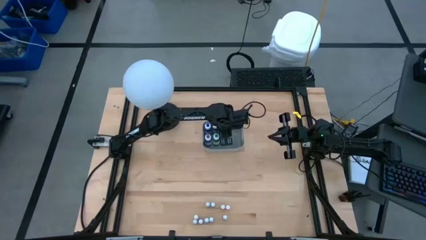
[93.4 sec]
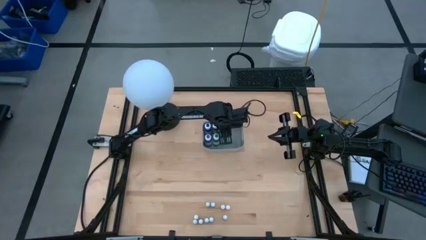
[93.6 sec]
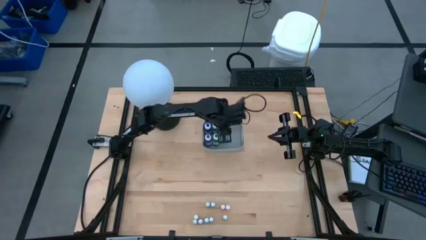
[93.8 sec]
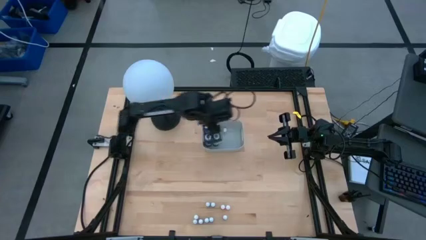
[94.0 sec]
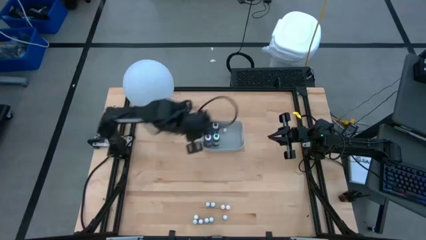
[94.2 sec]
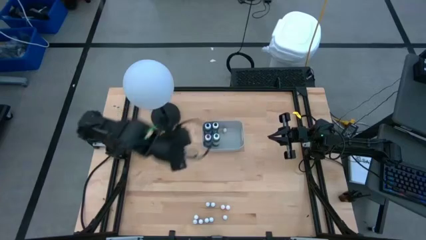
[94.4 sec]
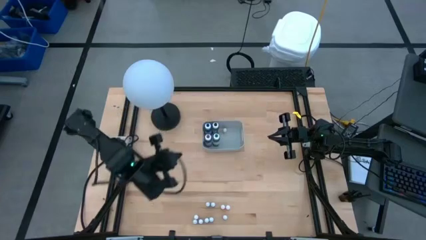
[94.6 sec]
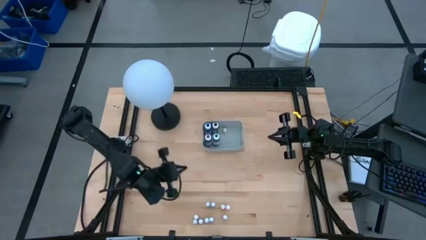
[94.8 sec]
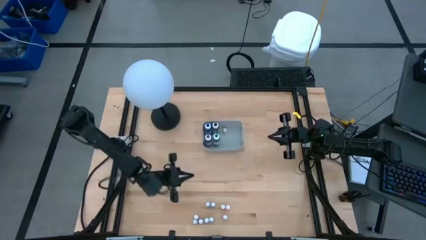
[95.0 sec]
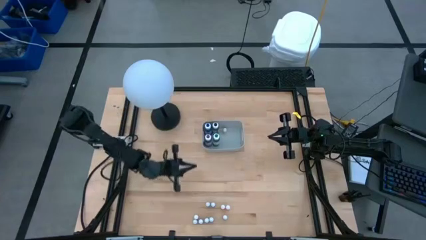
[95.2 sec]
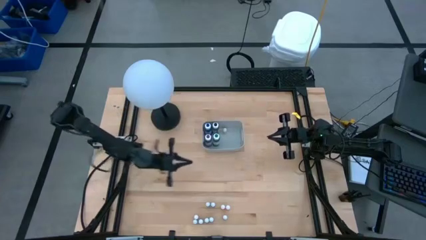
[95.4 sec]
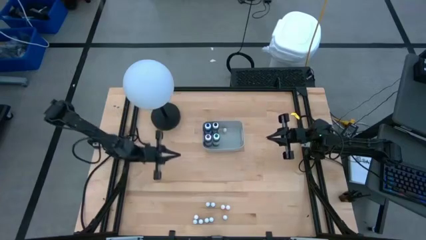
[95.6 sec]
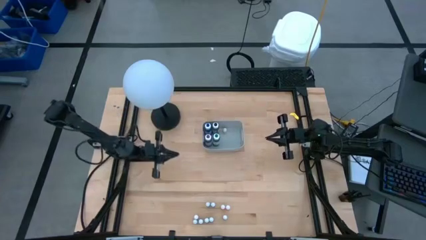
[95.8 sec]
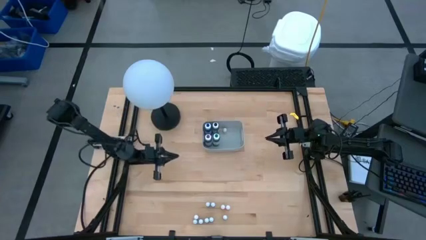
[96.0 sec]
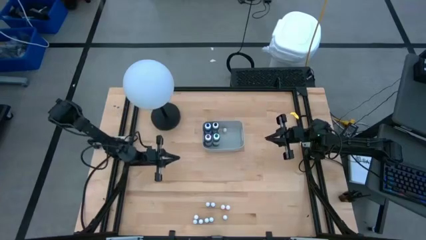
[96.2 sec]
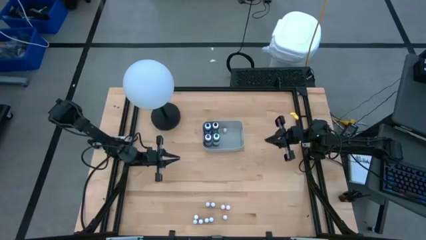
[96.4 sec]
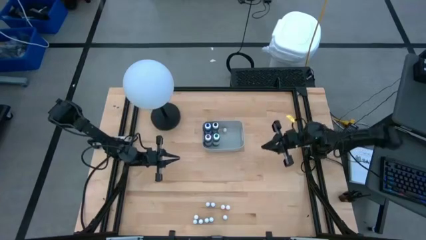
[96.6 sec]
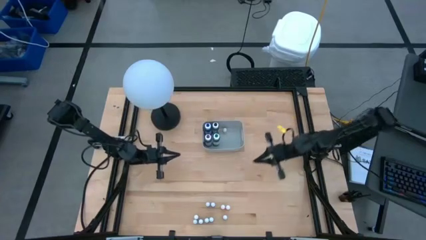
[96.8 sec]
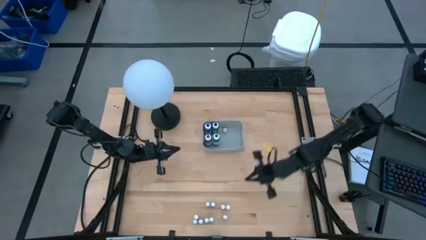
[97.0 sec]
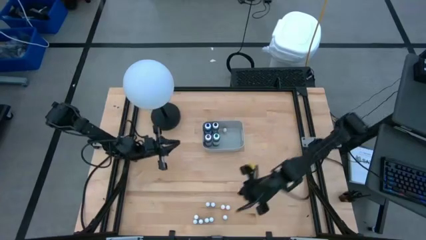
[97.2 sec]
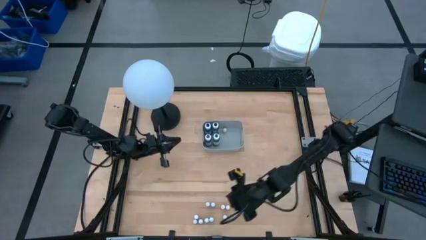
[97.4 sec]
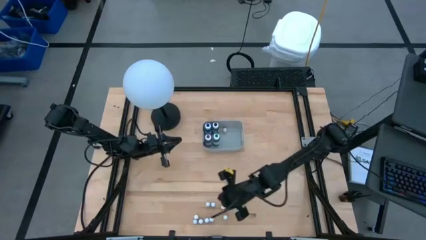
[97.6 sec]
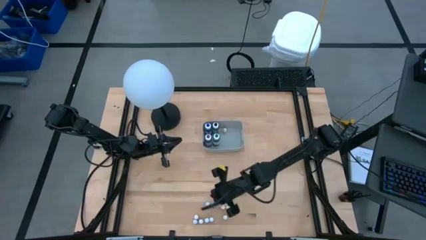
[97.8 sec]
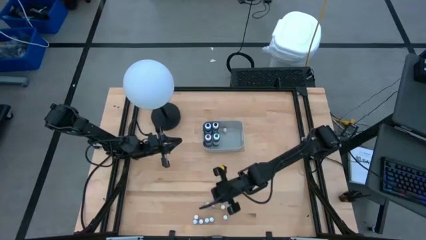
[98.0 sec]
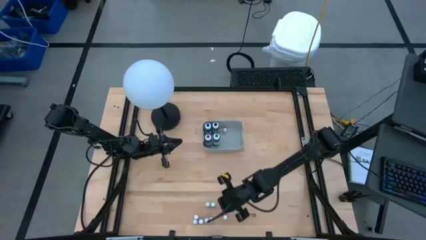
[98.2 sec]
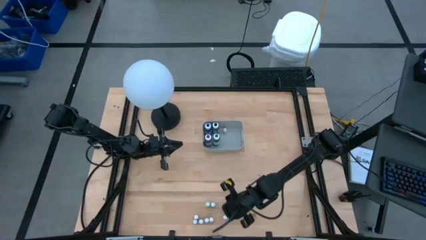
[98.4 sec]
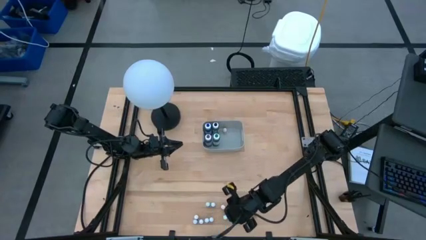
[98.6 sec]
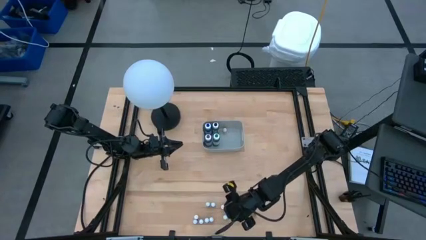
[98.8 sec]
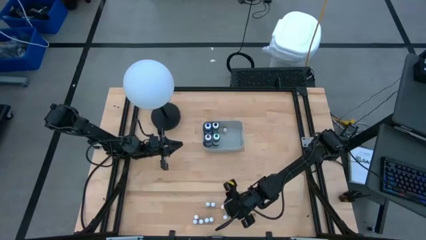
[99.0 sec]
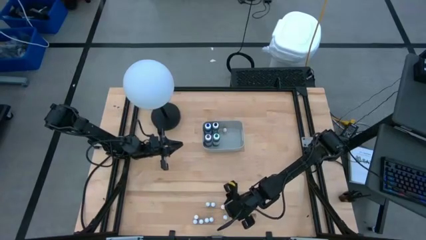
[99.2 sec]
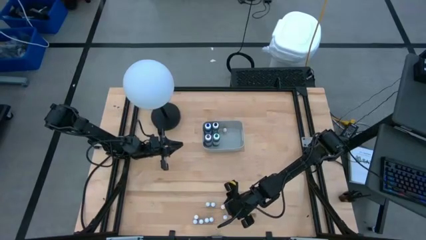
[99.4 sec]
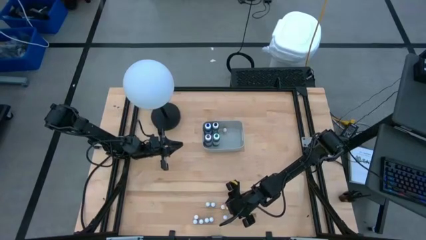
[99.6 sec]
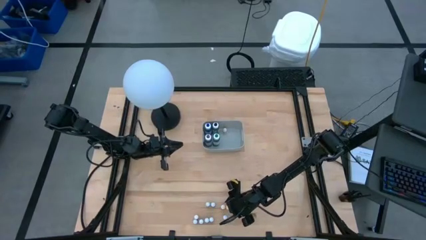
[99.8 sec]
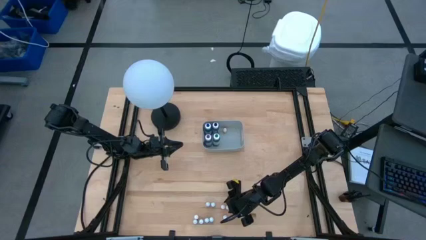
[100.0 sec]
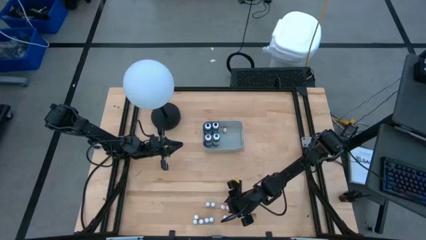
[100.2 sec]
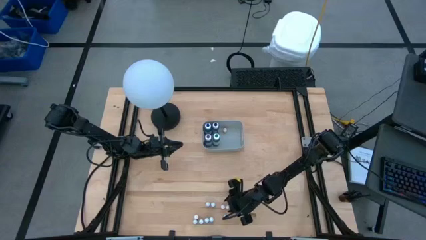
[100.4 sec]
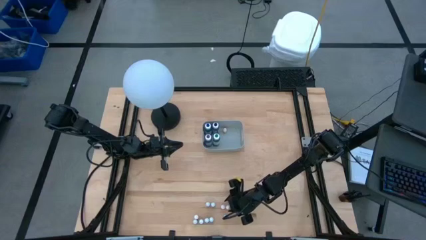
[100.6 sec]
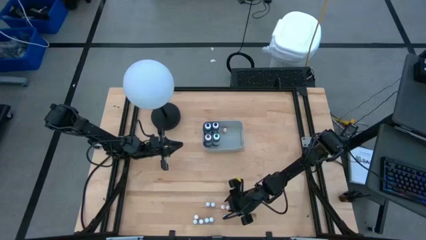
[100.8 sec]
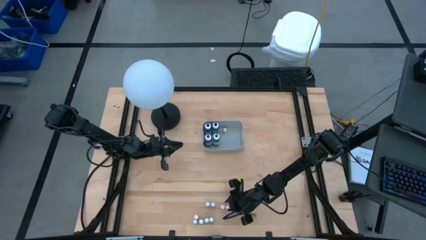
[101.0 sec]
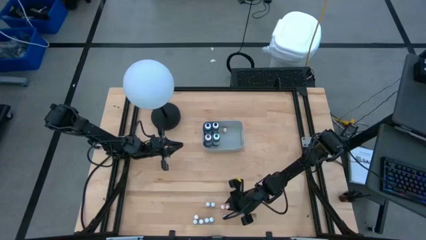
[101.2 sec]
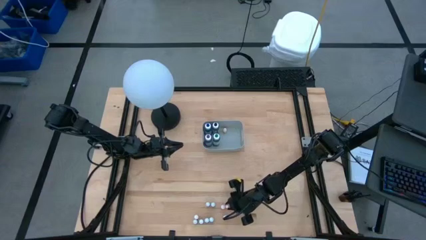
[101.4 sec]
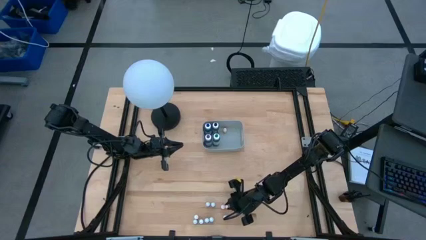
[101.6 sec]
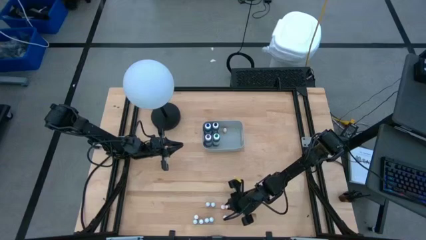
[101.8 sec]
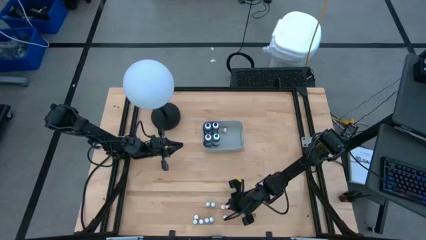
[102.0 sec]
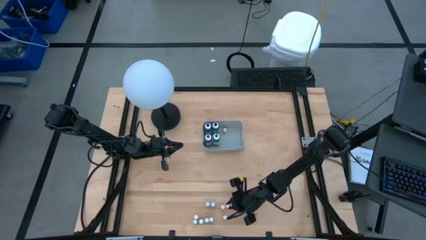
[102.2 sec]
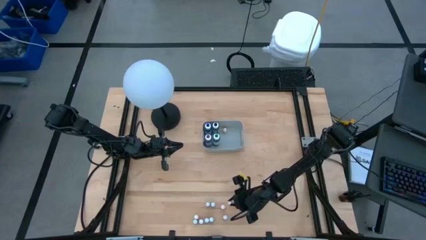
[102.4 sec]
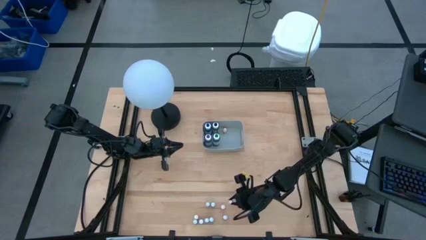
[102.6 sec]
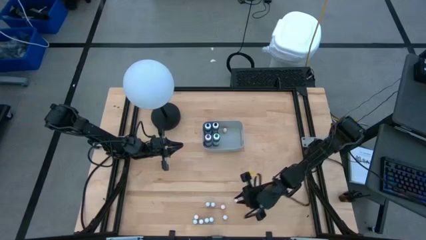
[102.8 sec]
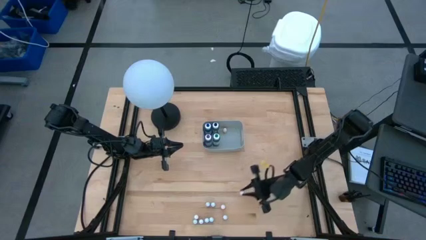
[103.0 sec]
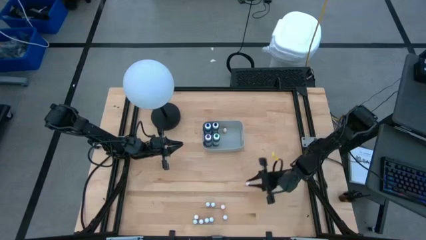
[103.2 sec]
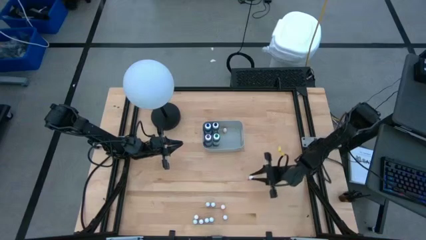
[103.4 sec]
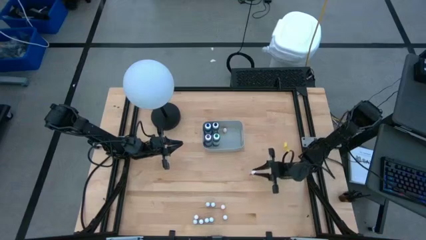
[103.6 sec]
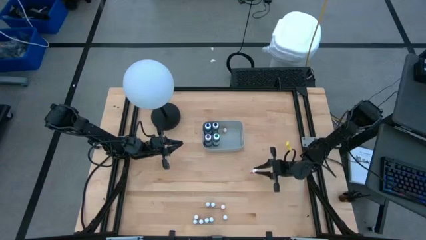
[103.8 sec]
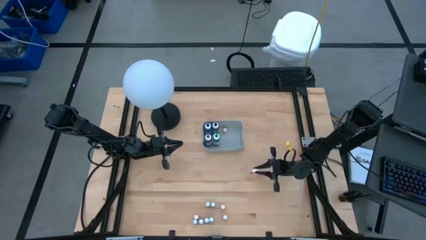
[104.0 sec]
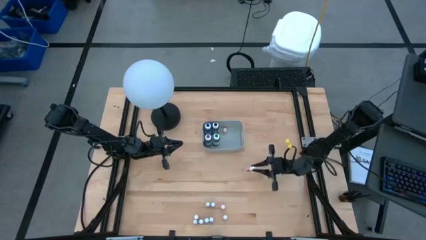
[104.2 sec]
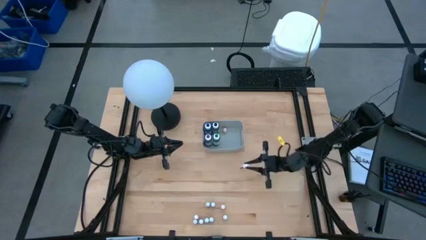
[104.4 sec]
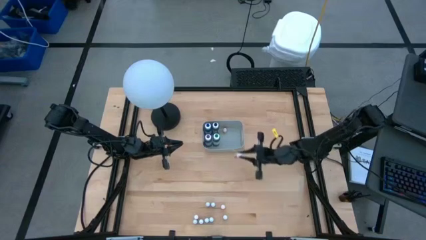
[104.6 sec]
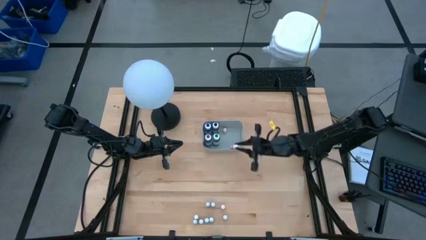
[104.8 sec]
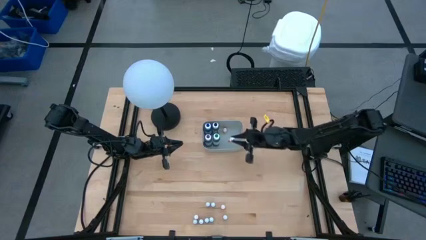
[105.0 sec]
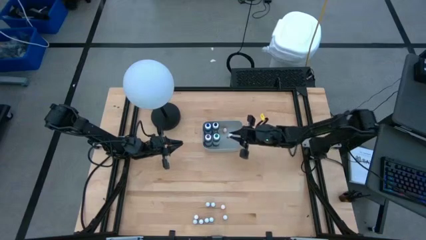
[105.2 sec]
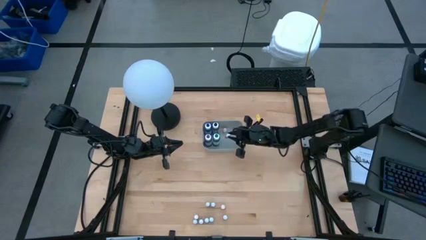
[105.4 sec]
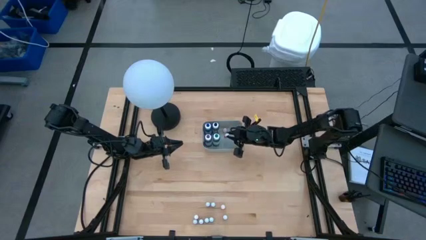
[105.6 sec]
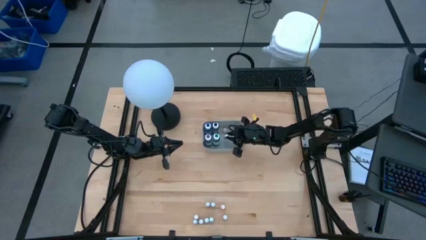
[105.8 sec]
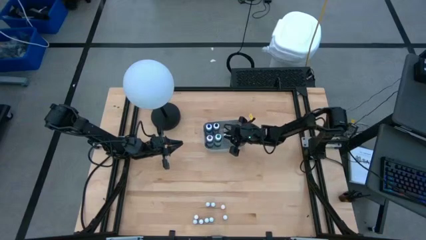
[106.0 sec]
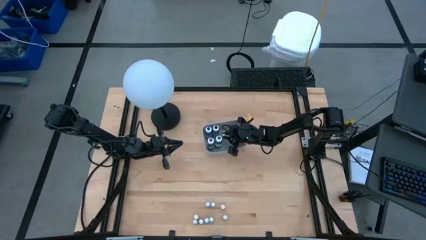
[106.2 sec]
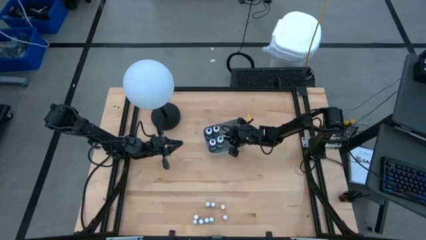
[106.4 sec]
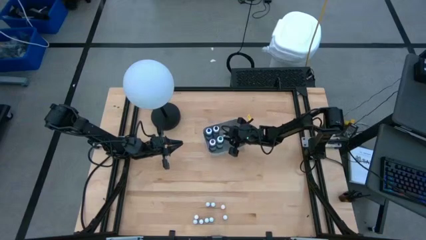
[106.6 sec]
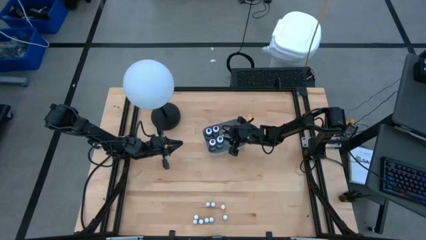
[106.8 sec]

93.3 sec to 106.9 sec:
Task: Pick & Place food coloring
Put the top right small yellow food coloring bottle into the gray bin

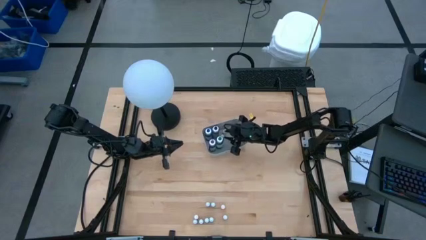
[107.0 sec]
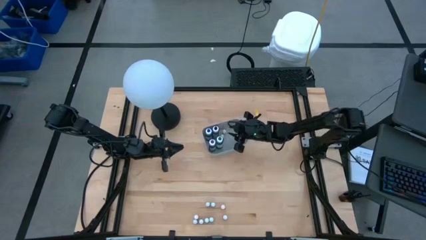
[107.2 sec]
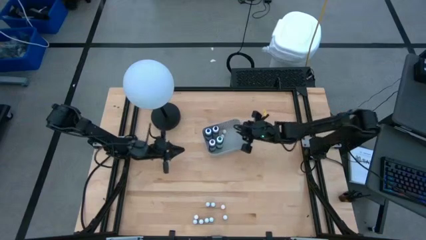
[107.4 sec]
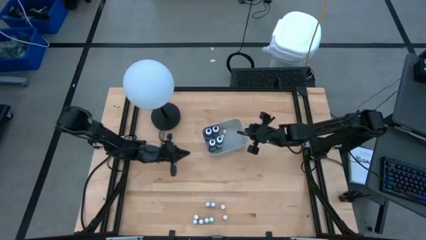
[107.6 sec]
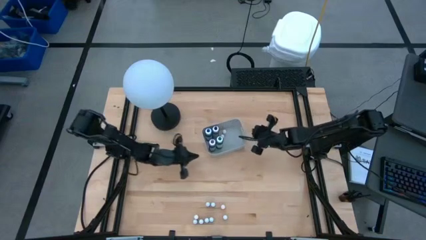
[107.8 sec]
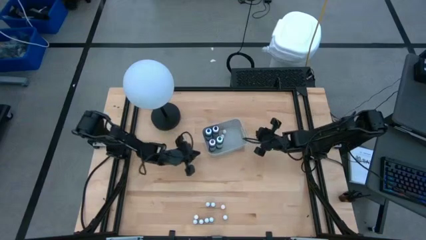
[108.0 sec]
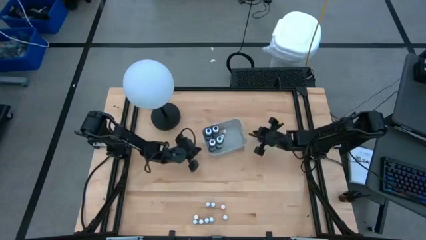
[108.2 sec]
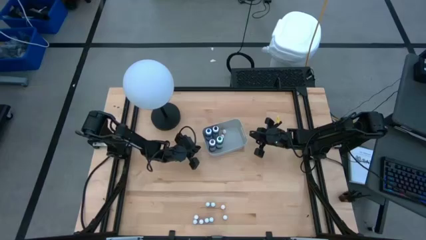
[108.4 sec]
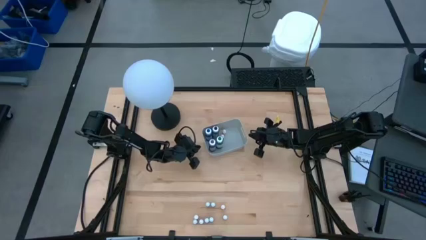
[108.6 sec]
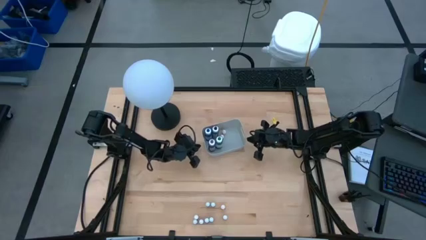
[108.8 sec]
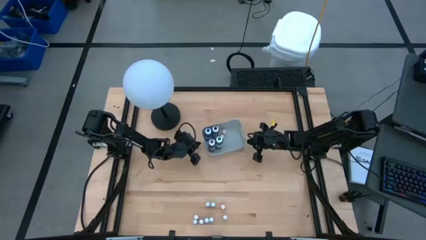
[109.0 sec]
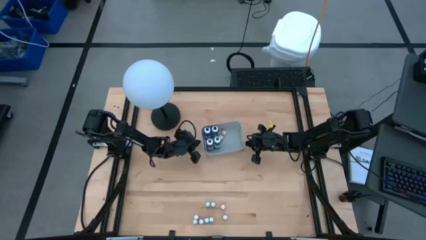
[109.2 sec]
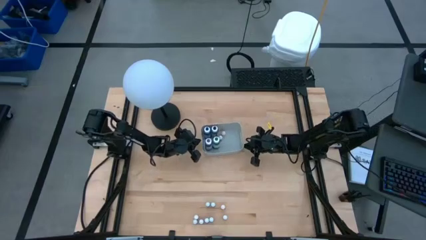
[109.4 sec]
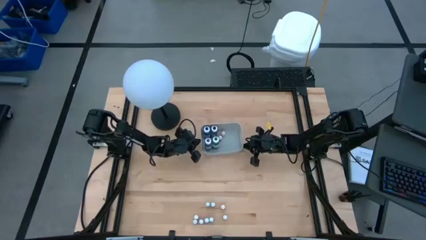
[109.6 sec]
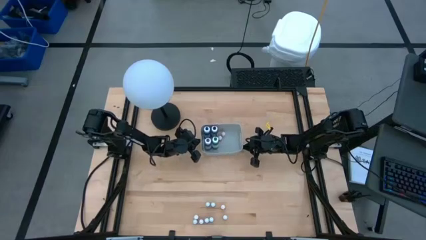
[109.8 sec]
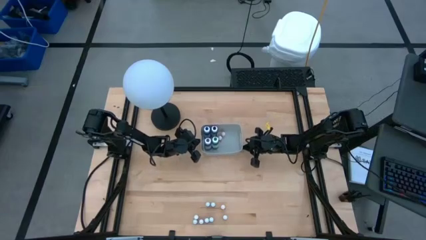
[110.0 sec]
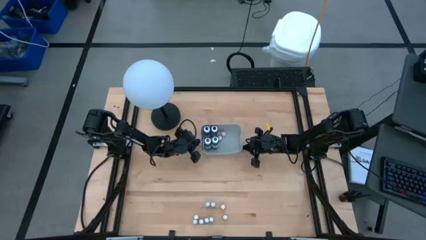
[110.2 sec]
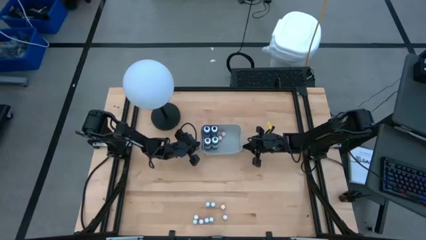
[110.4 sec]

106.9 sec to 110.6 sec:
Adjust the gray bin
